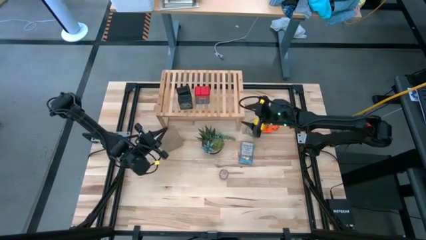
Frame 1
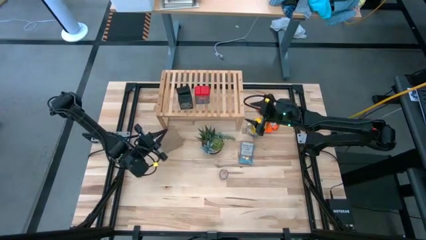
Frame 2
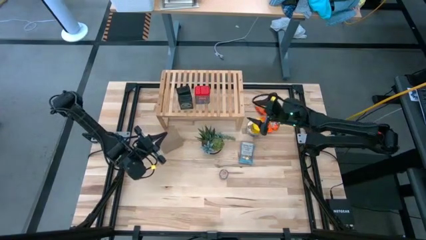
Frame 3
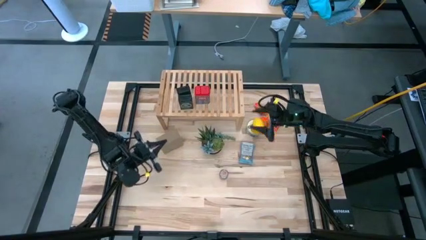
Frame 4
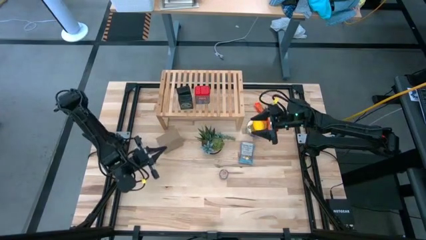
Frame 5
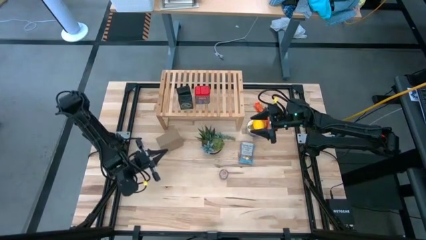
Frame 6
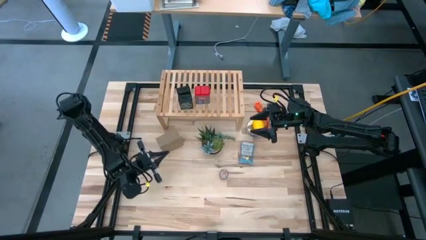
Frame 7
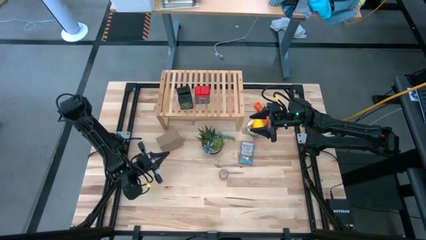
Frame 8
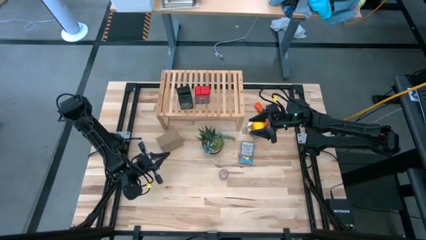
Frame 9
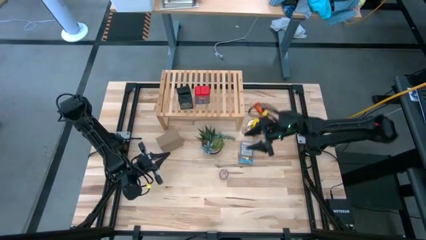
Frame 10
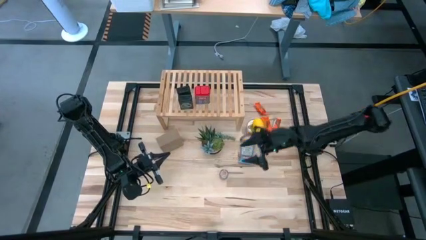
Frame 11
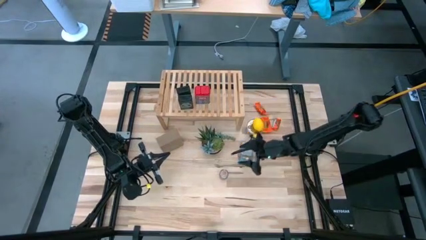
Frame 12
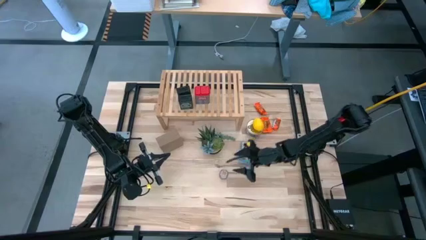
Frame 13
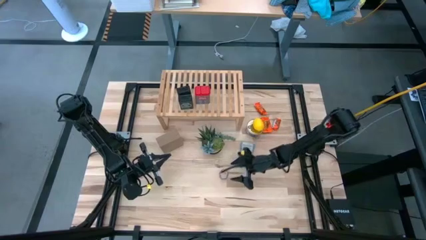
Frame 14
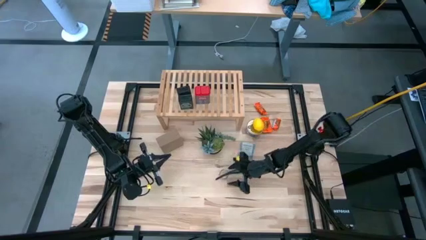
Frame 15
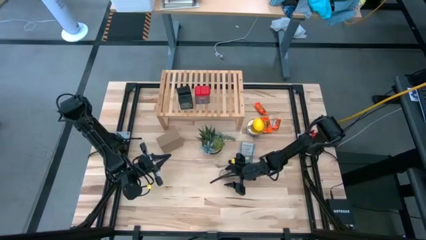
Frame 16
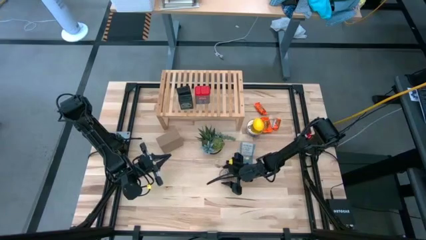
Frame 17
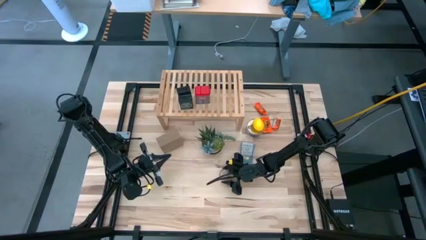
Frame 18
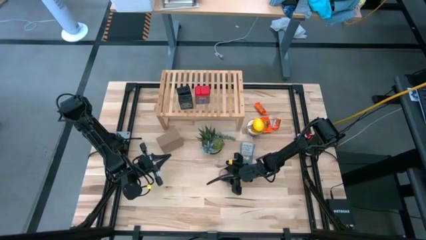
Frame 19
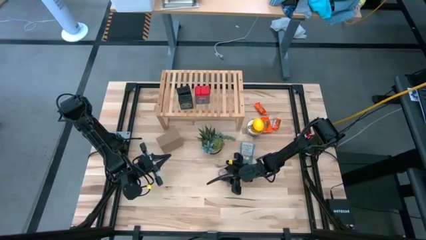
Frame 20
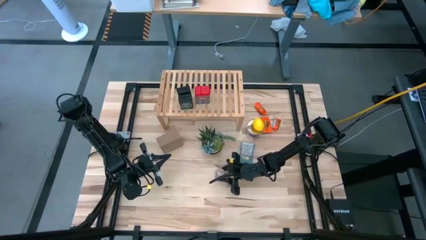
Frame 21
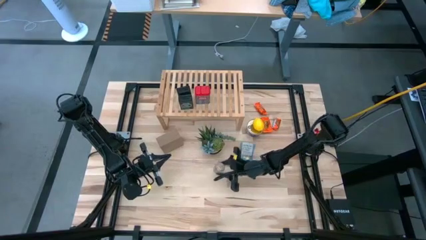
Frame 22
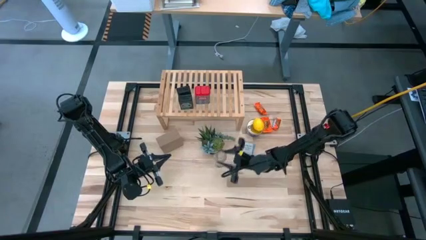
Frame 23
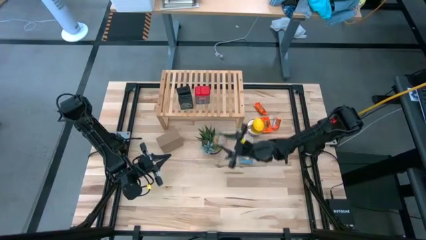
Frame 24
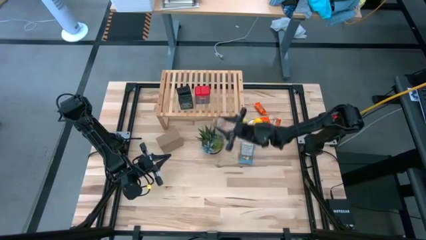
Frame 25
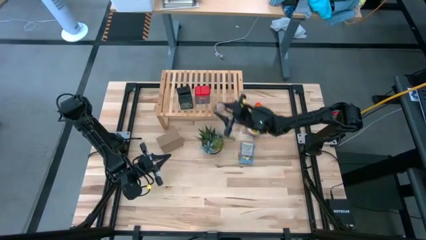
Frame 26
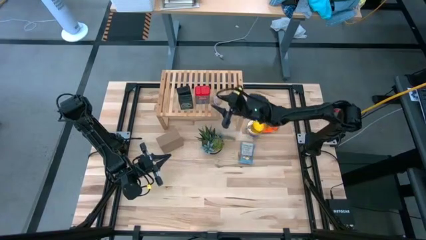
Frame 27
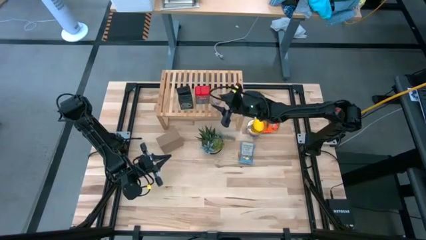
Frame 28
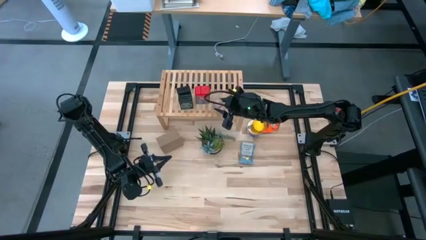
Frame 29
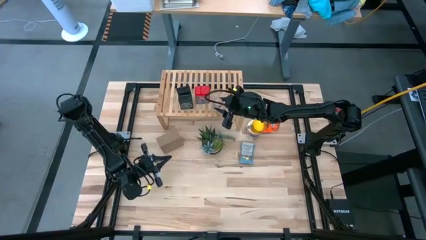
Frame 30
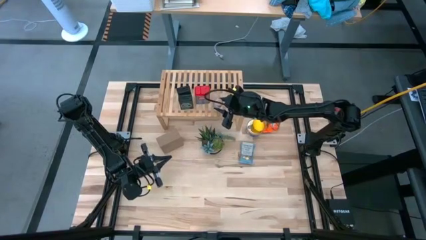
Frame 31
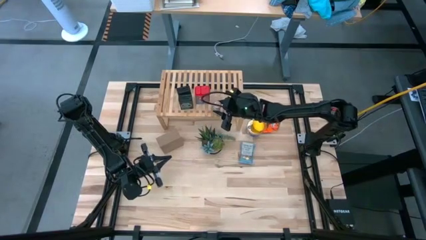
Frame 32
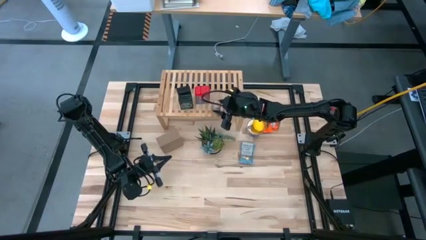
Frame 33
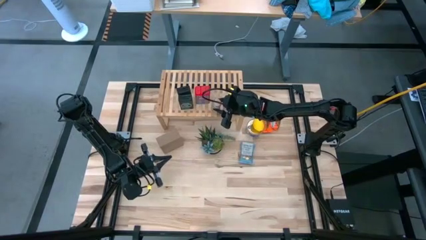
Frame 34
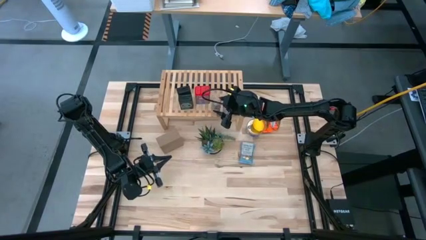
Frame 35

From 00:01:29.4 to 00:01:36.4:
Task: Shelf spices
Put the brown seasoning bottle on the shelf

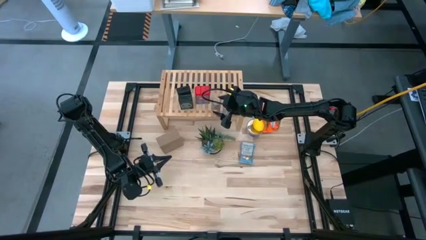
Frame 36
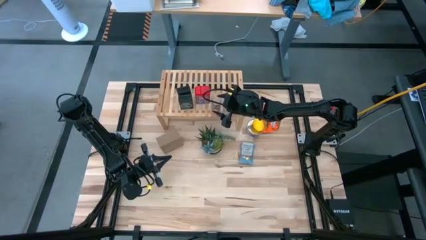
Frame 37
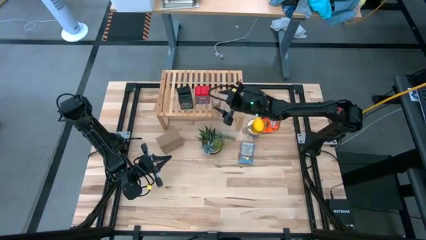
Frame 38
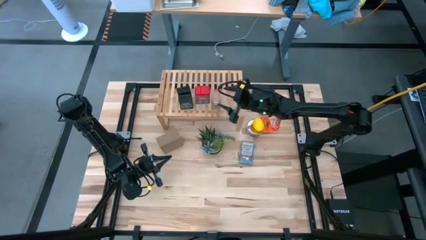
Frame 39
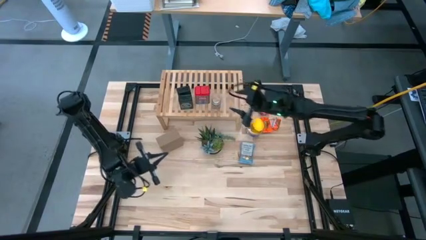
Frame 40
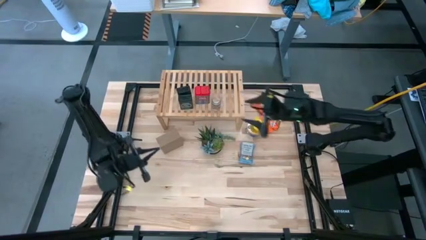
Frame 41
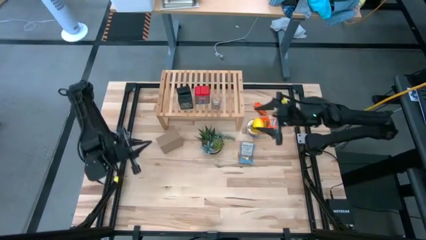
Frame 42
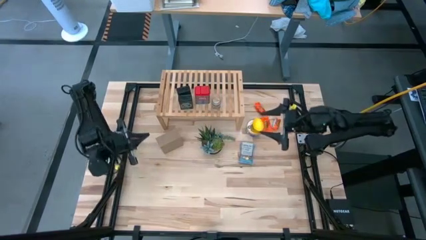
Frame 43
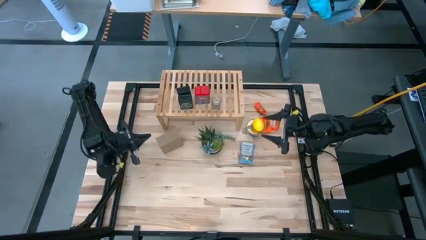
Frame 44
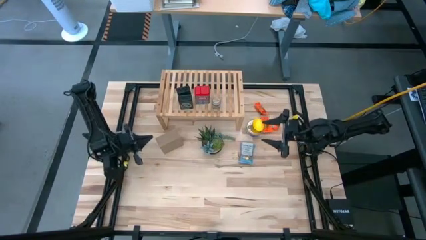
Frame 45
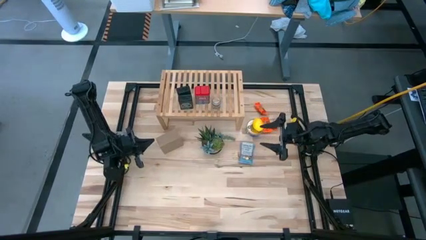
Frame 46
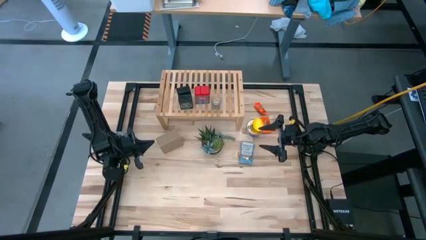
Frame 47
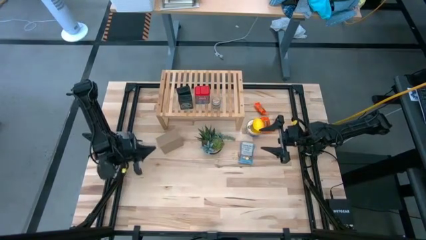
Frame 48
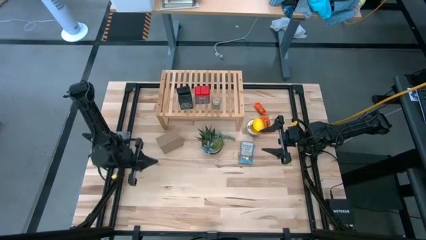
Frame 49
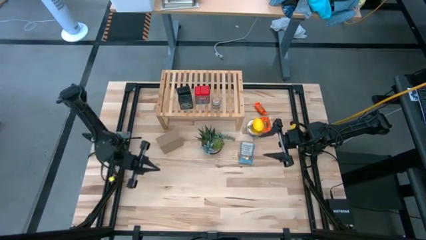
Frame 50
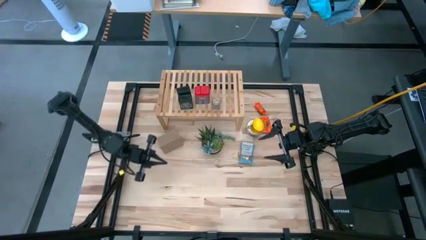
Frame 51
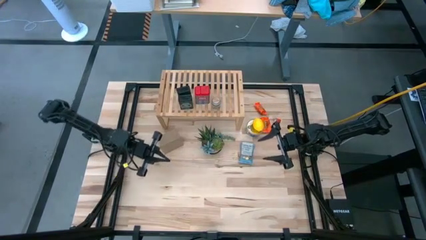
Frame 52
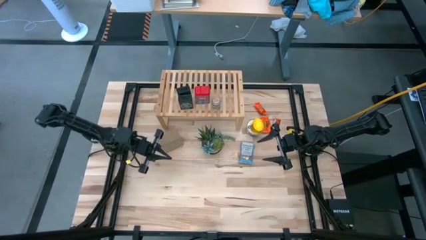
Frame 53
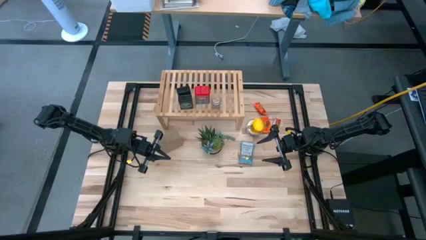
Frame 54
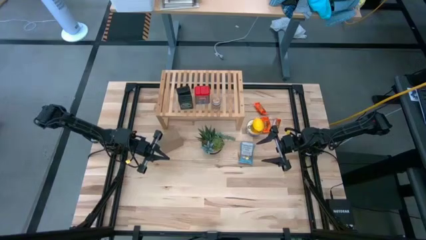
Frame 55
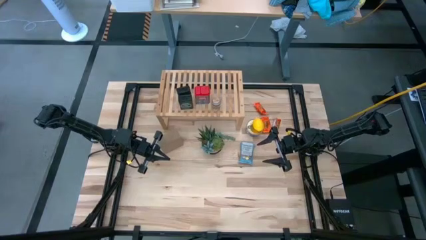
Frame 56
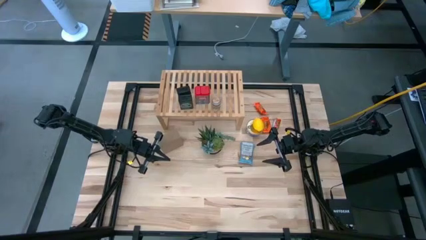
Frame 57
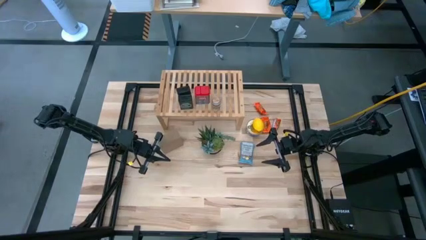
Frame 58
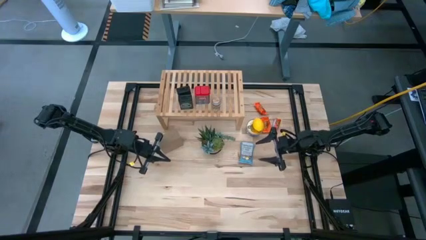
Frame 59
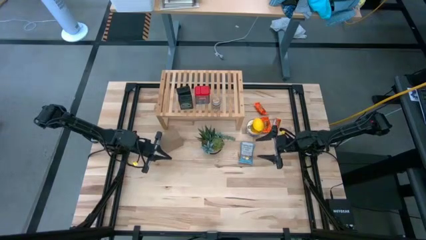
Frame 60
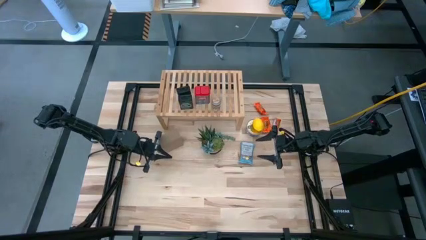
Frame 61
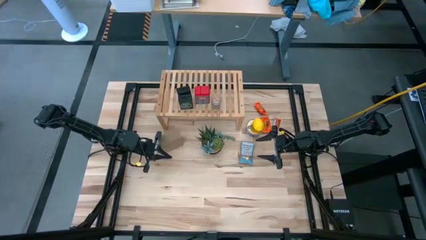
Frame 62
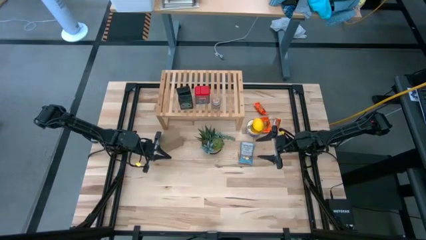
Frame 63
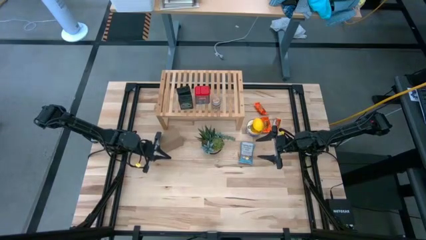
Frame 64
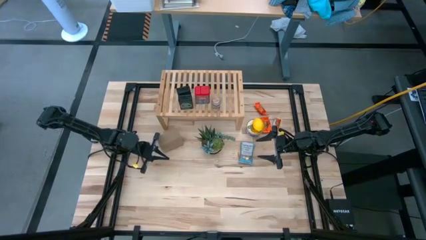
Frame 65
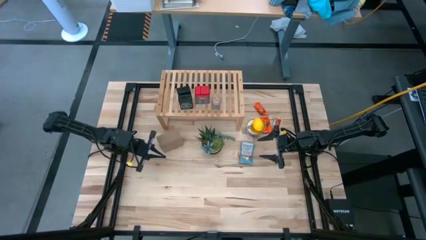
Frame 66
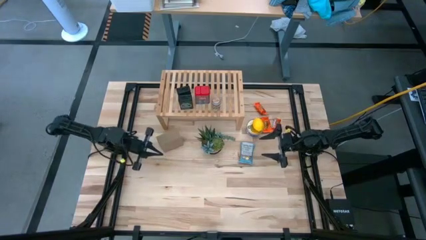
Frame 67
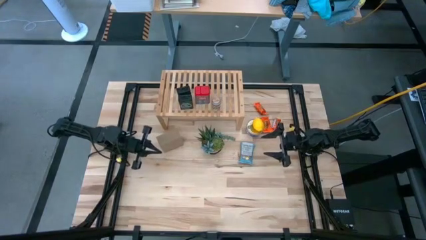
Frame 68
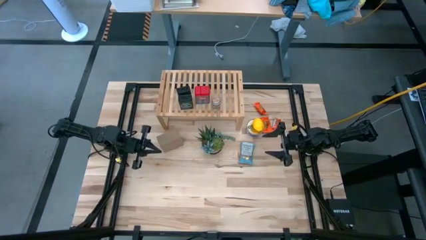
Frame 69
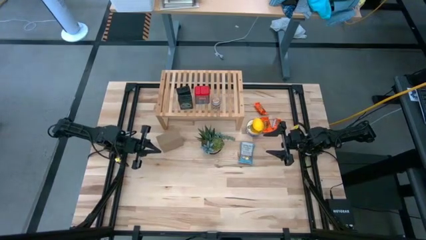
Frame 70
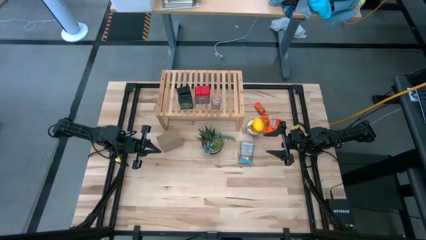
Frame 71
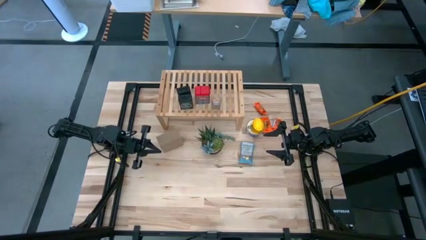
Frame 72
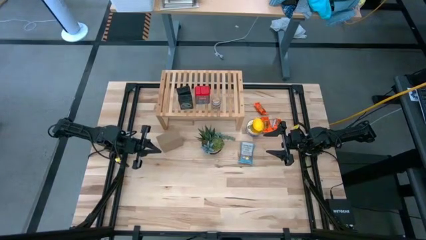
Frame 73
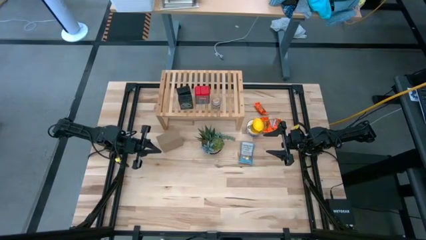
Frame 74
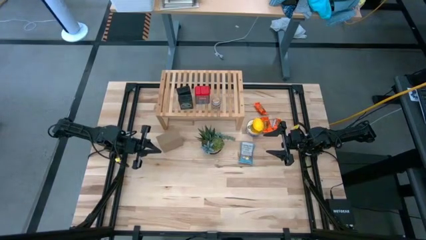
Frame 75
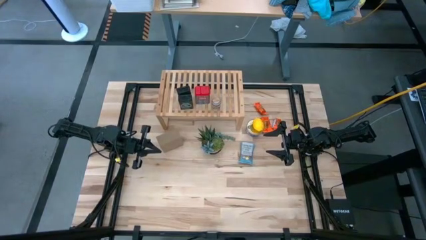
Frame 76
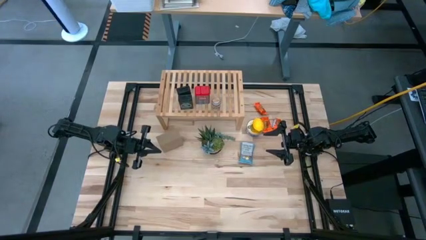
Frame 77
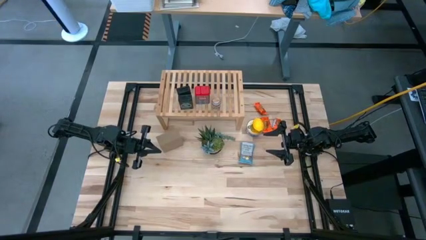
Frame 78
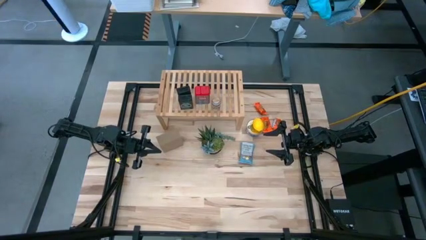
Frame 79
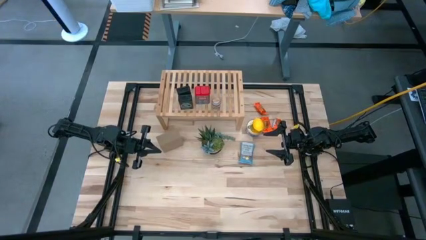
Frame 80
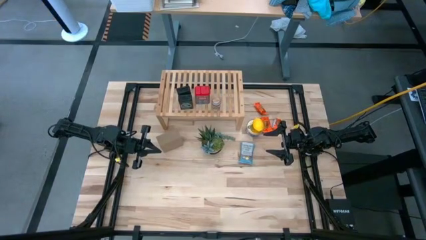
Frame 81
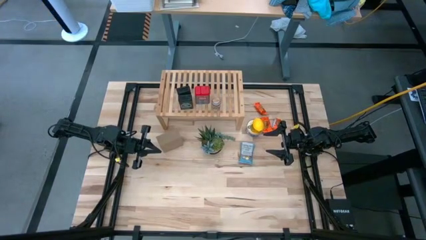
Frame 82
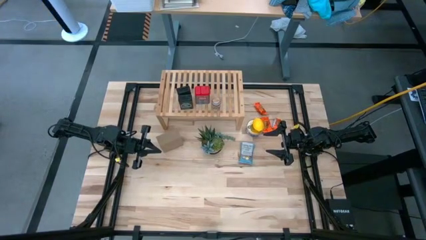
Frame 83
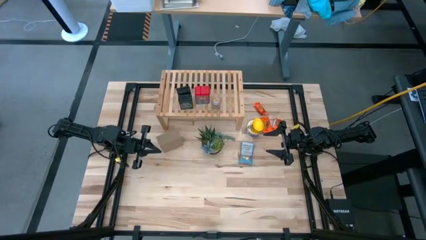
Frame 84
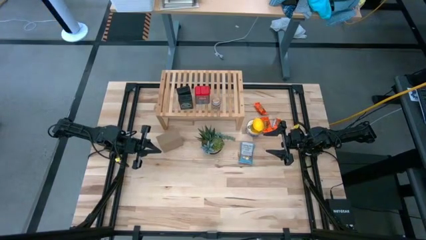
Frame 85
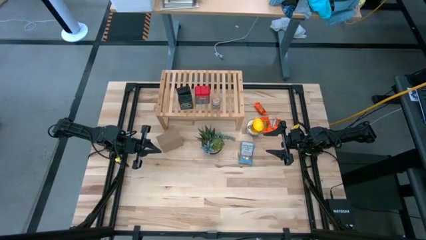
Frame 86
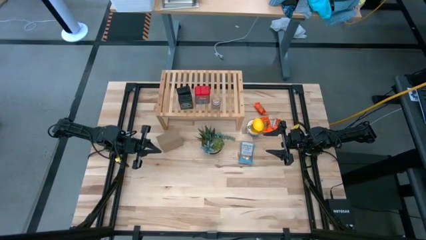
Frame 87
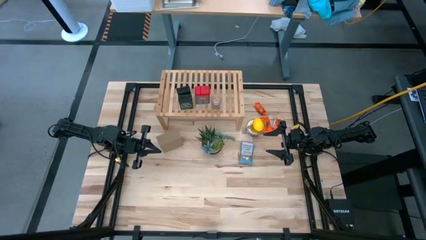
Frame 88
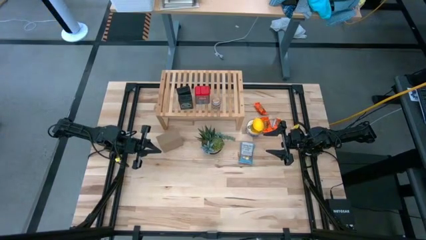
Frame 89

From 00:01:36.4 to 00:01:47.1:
Return to Home Position
